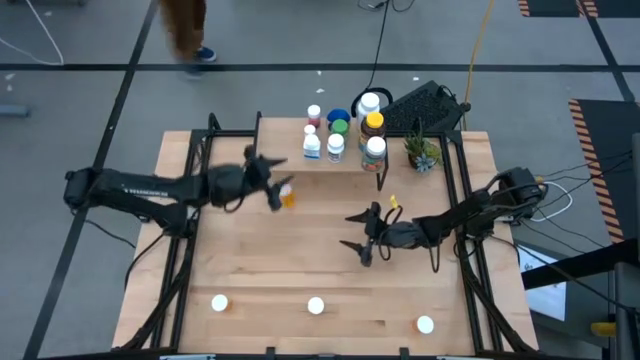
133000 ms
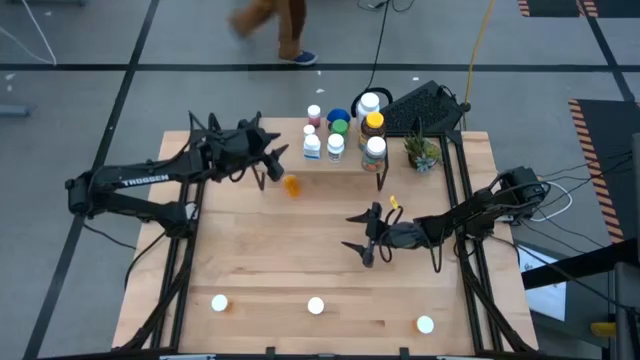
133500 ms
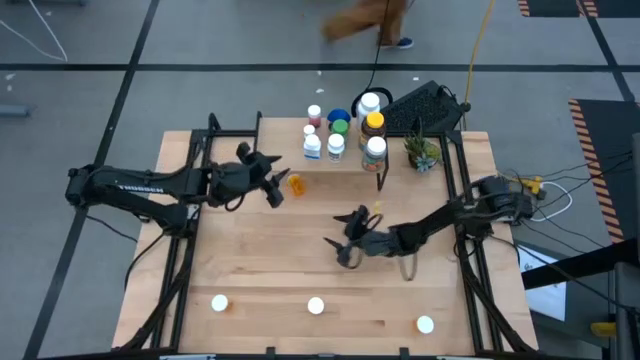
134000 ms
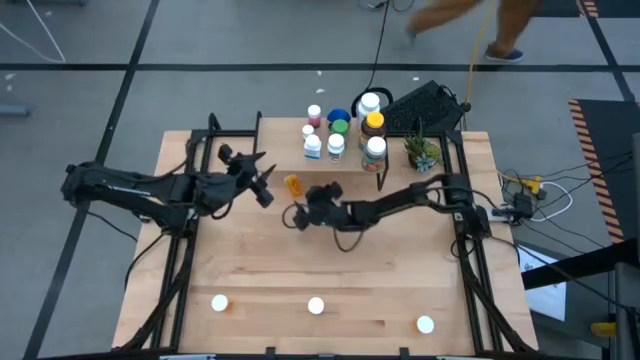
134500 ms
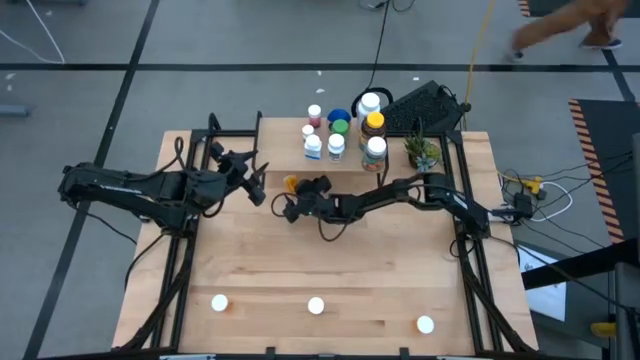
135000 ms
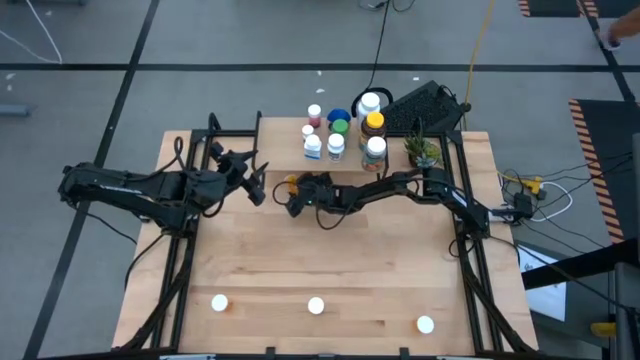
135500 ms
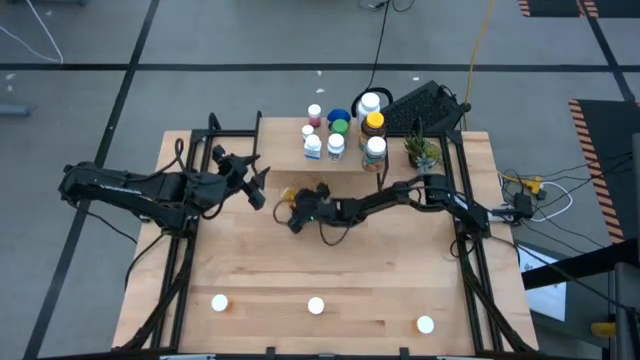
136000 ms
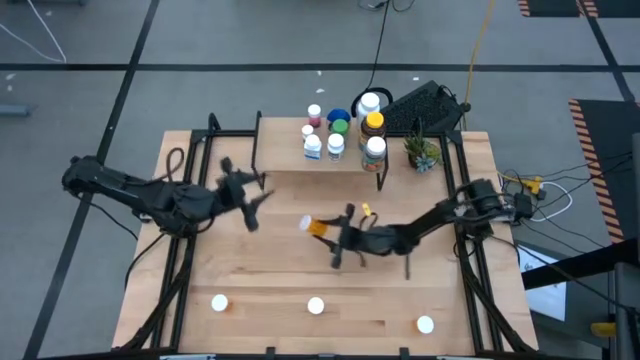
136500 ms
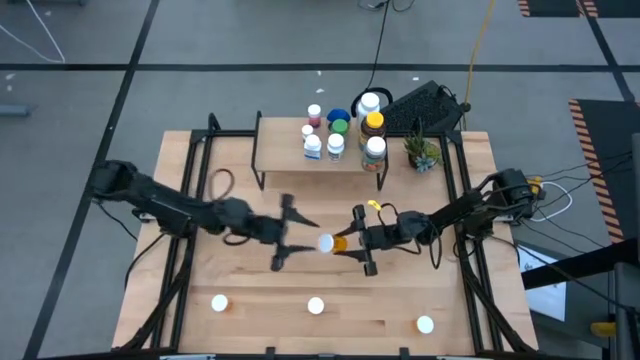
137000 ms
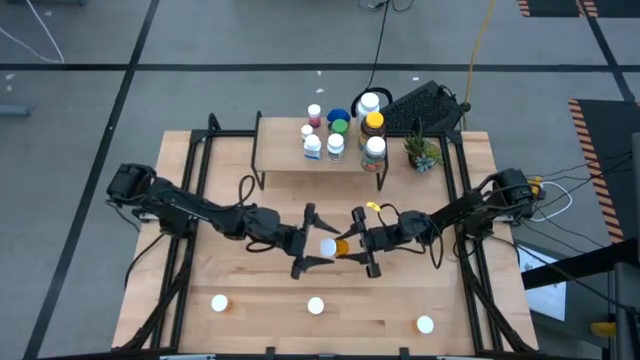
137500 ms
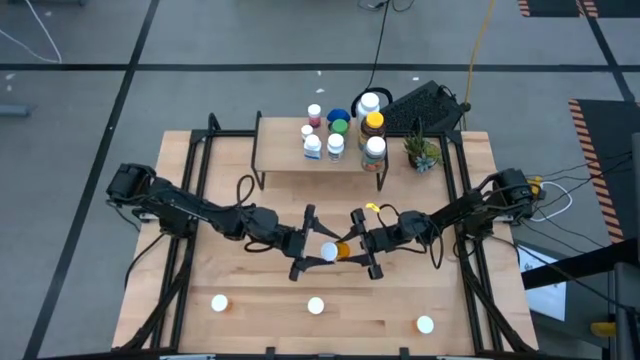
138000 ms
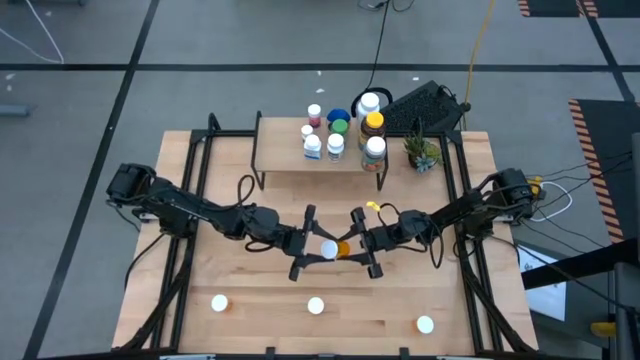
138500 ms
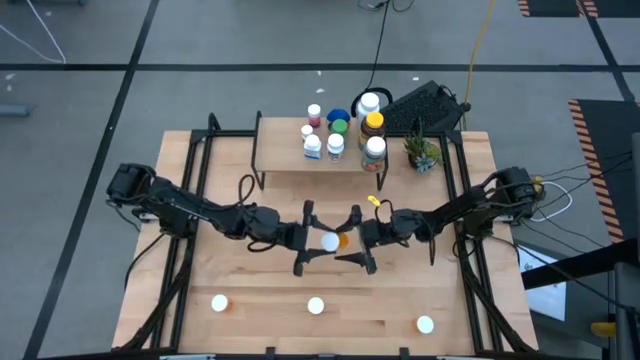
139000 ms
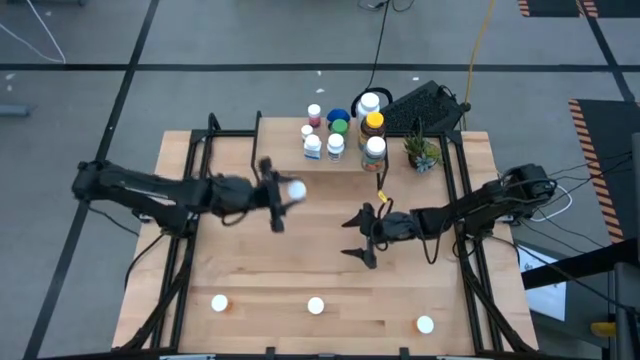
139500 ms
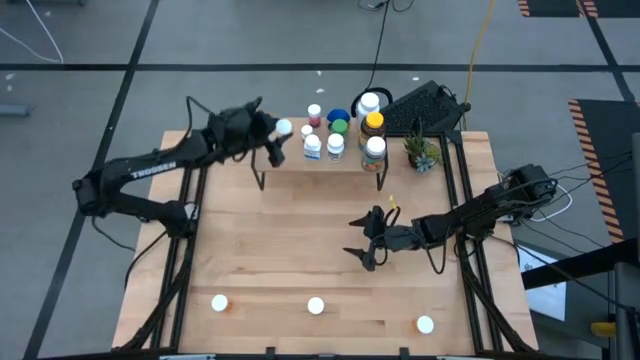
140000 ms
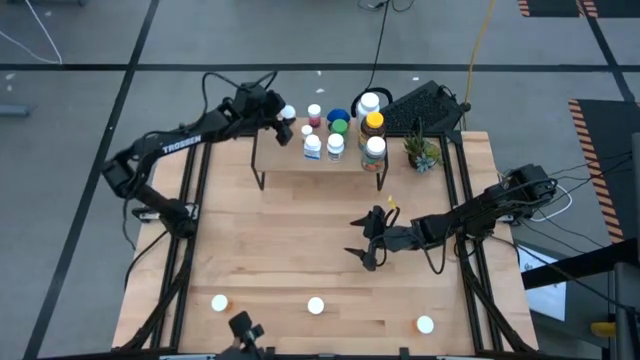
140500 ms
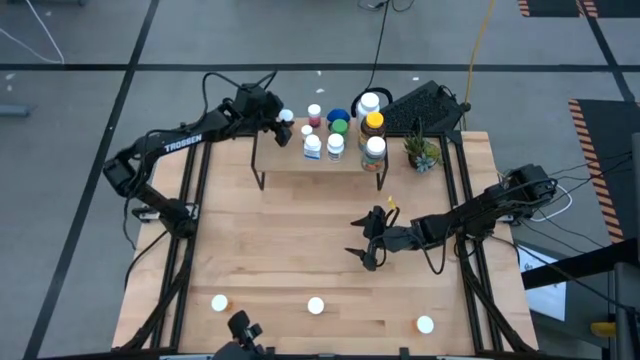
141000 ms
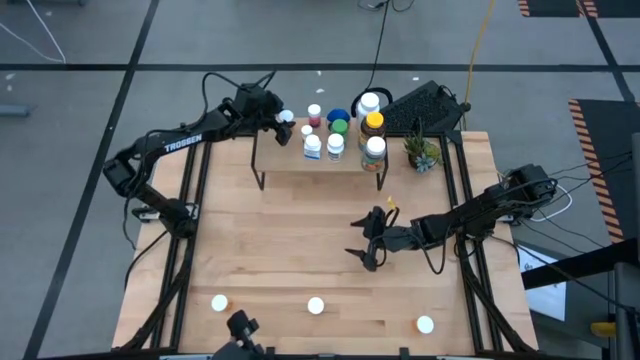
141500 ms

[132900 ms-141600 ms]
Task: Pick and place medicine bottles onto shelf by color
Put the top left orange pill bottle on the shelf

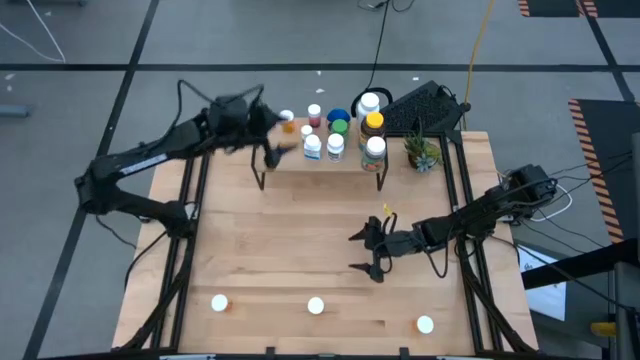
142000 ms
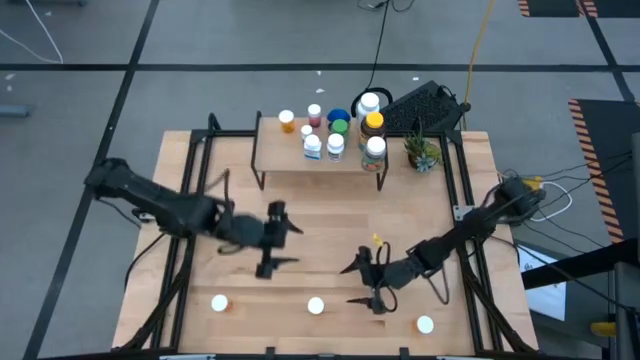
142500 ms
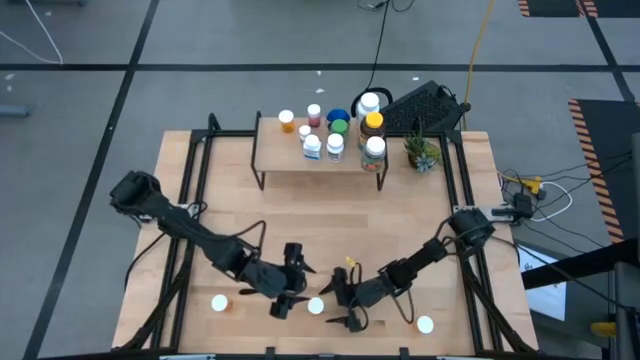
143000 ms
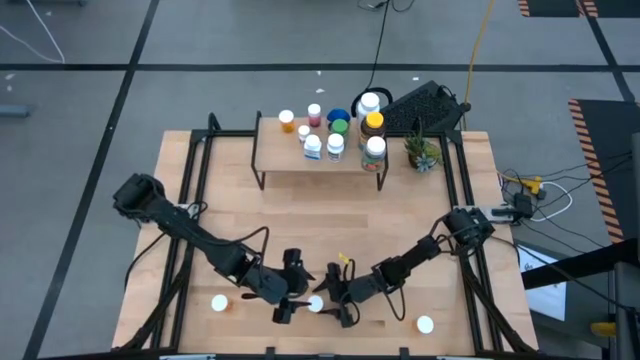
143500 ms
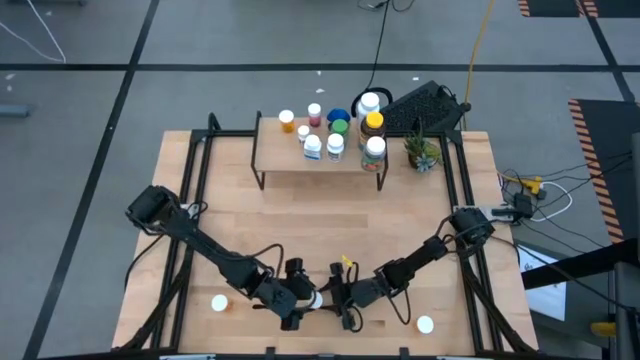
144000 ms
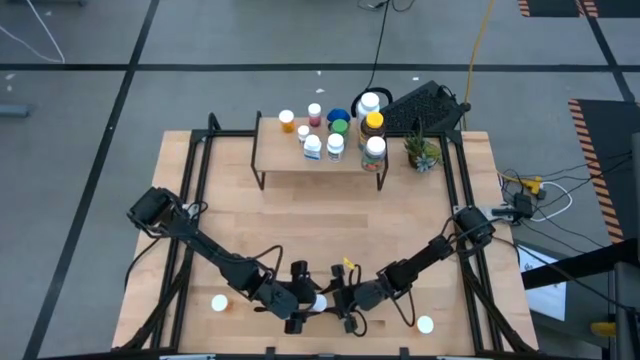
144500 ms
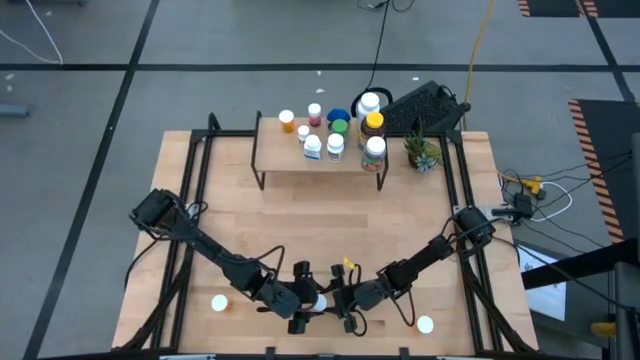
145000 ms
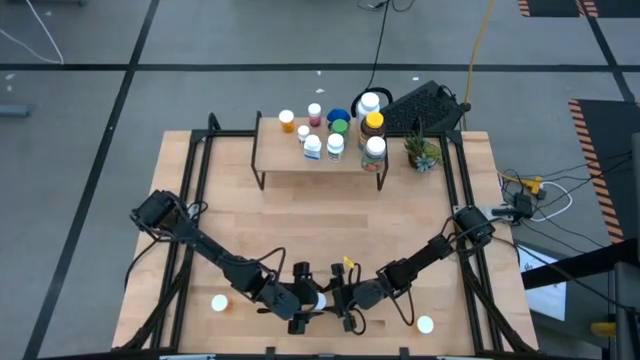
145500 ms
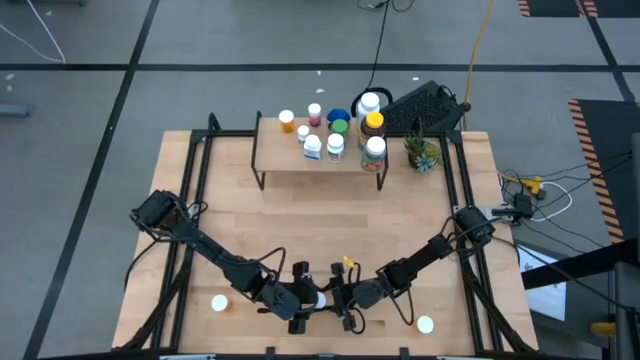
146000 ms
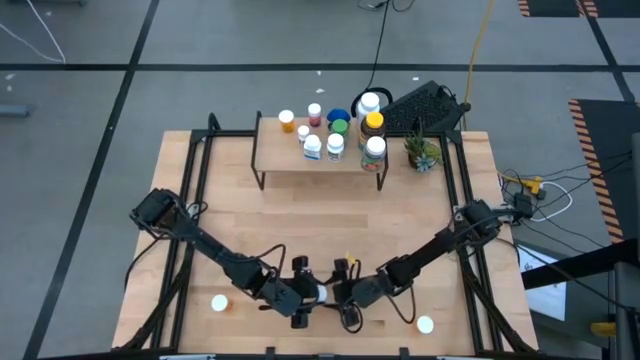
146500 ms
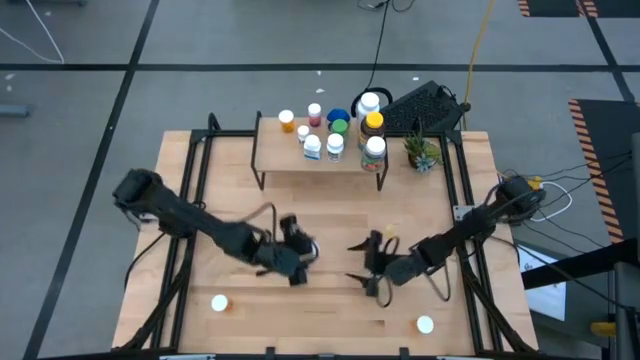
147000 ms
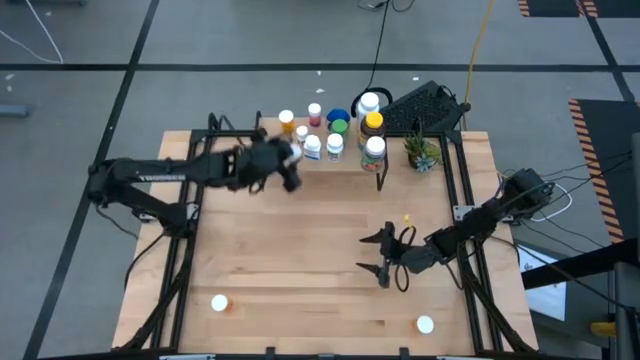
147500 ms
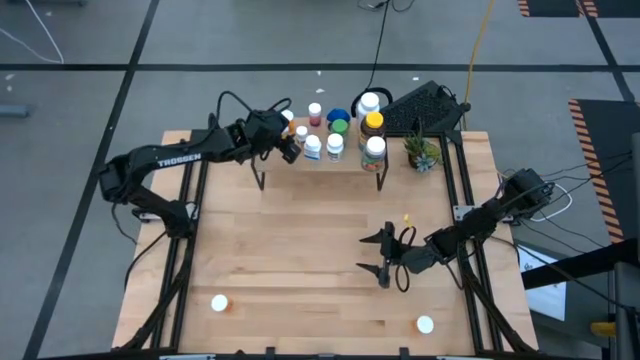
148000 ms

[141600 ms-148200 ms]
Put the middle orange pill bottle on the shelf

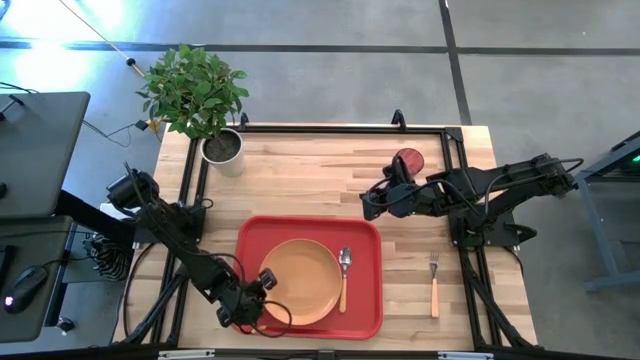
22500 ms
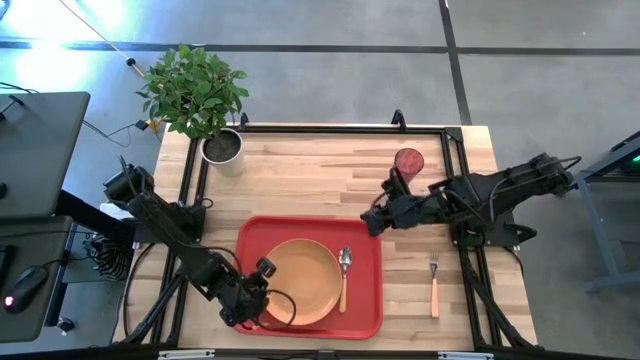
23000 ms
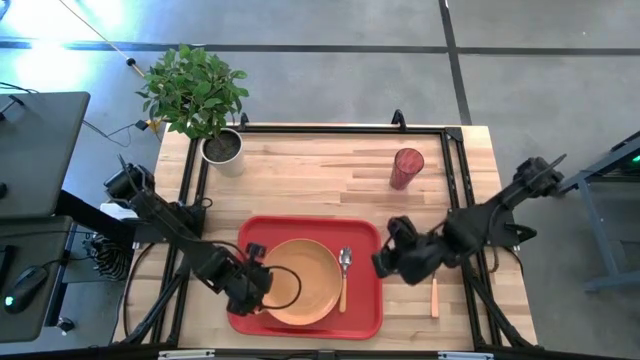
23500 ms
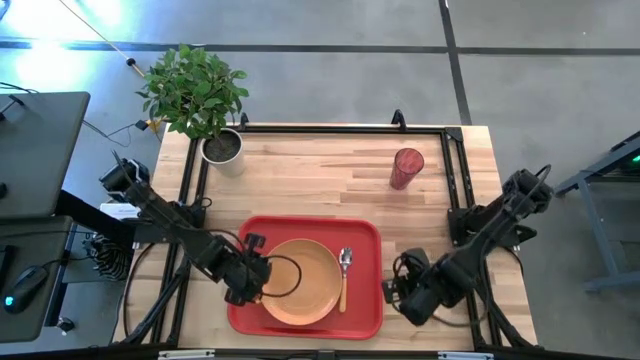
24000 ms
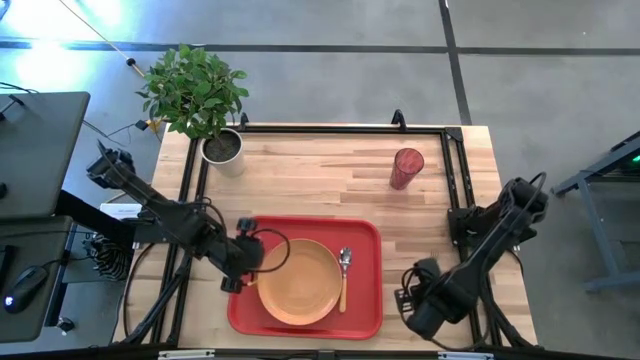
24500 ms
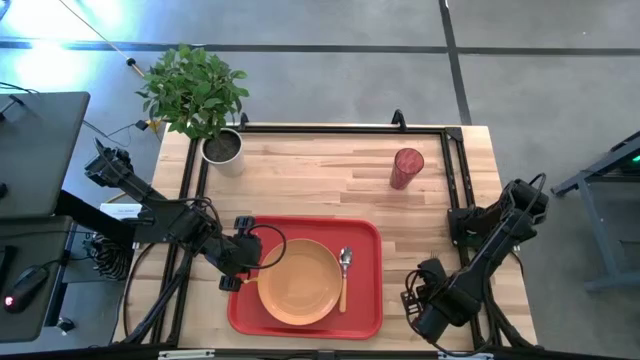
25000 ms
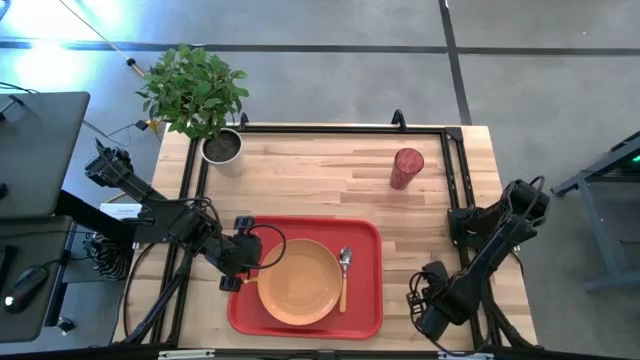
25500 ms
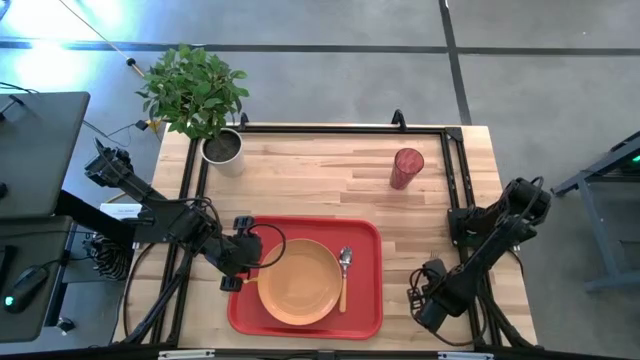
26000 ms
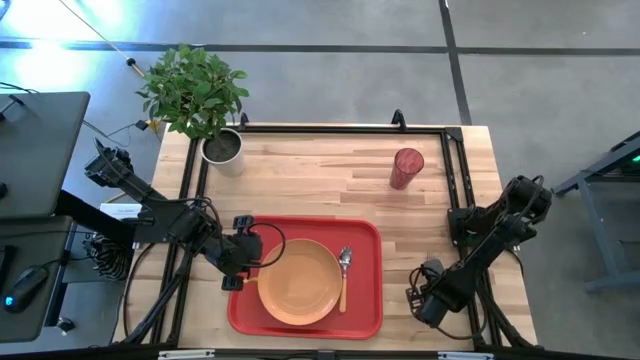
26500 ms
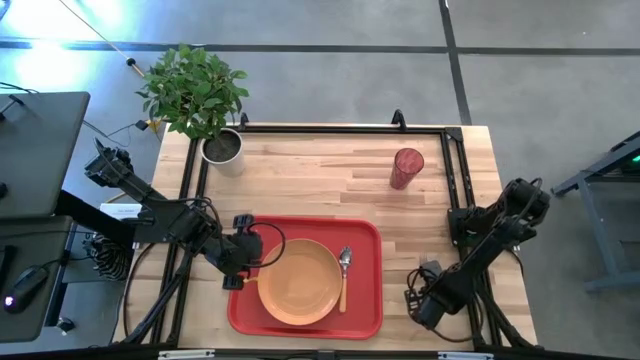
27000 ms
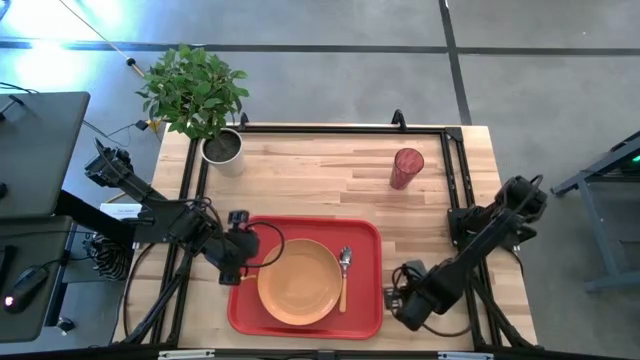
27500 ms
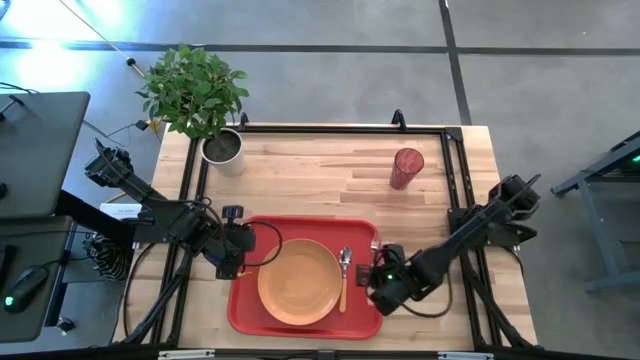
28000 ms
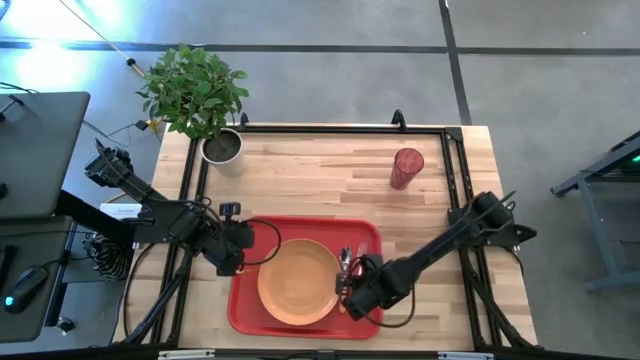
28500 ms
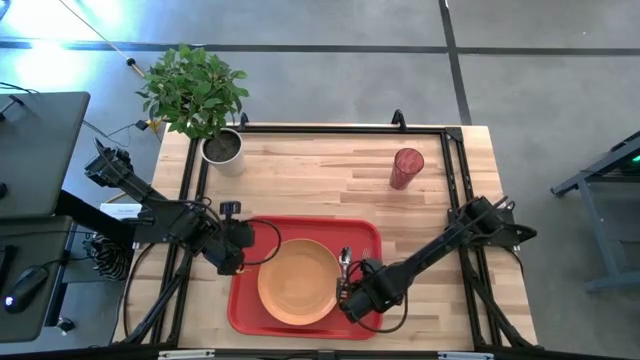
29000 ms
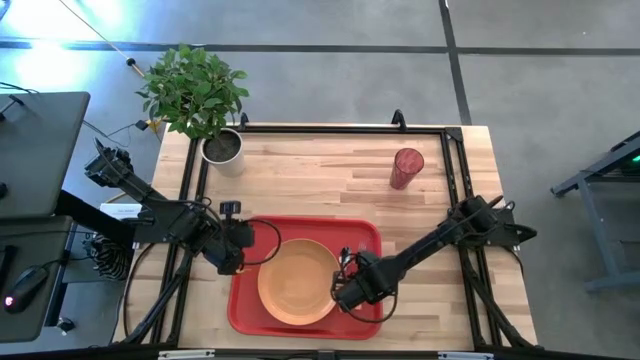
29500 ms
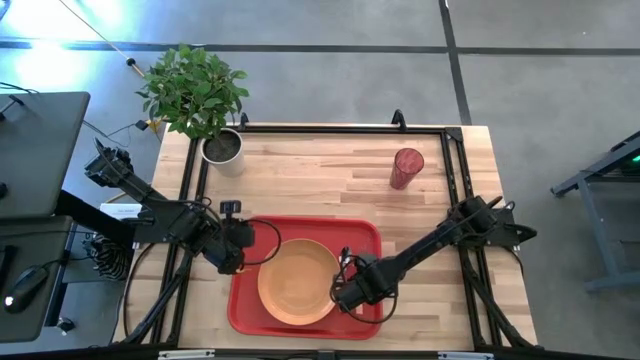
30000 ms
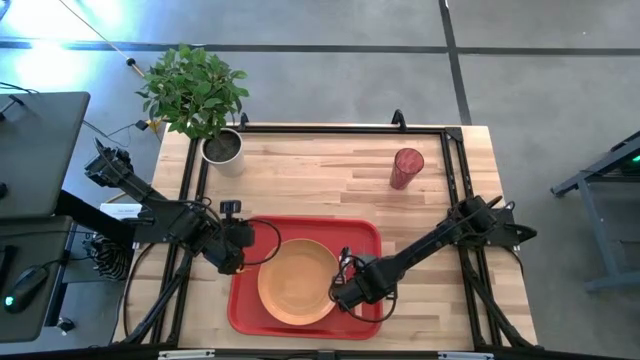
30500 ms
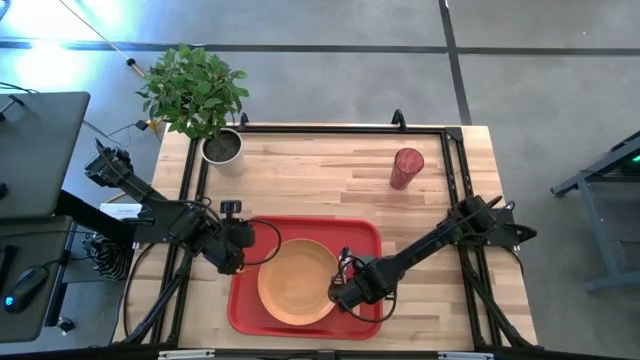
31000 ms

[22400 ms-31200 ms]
Task: Pick and place plate/cup/fork/spoon on tray
Put the light orange fork to the right of the yellow spoon
